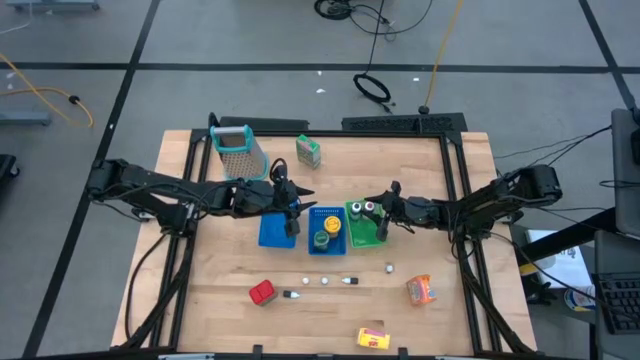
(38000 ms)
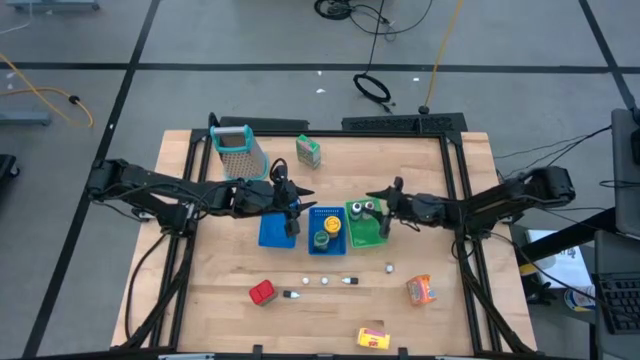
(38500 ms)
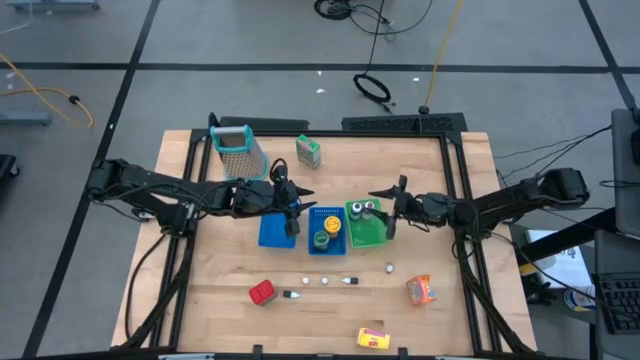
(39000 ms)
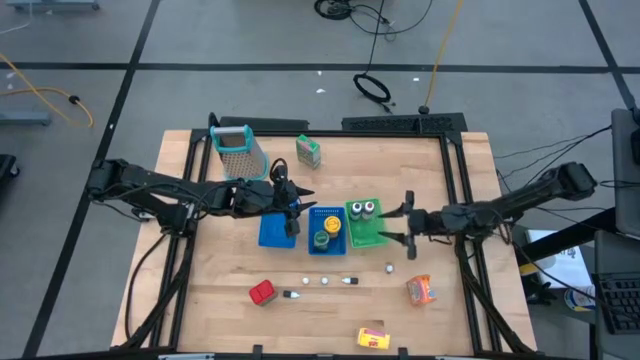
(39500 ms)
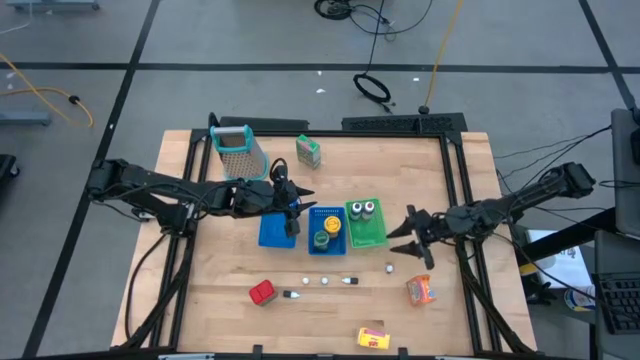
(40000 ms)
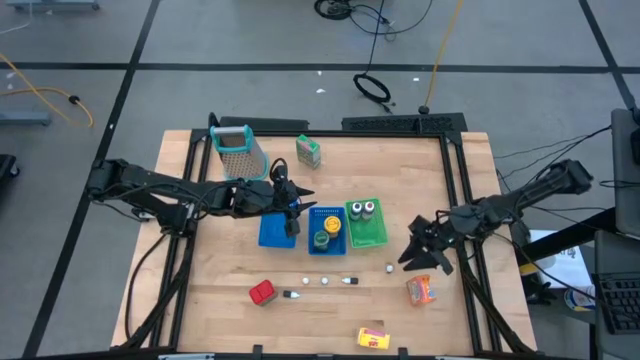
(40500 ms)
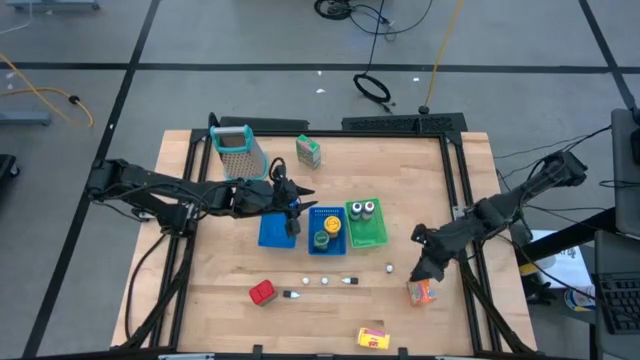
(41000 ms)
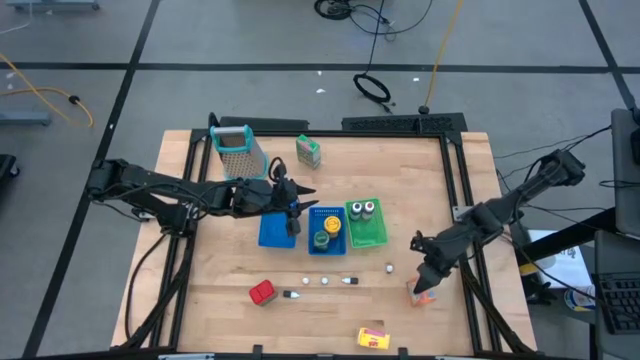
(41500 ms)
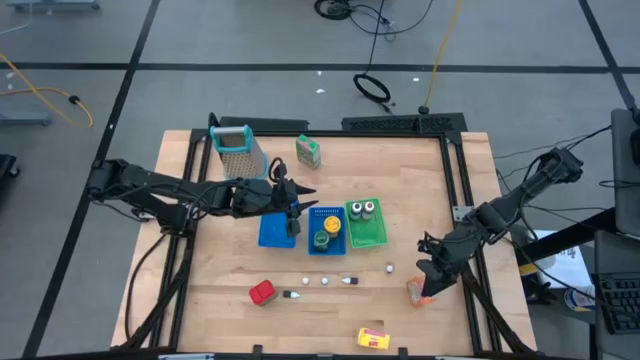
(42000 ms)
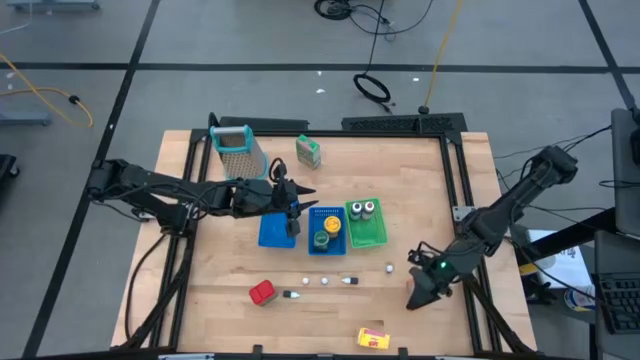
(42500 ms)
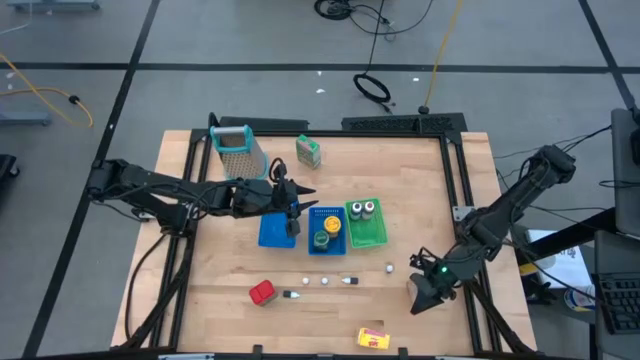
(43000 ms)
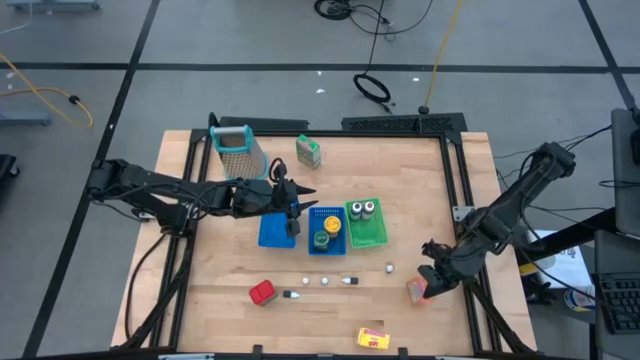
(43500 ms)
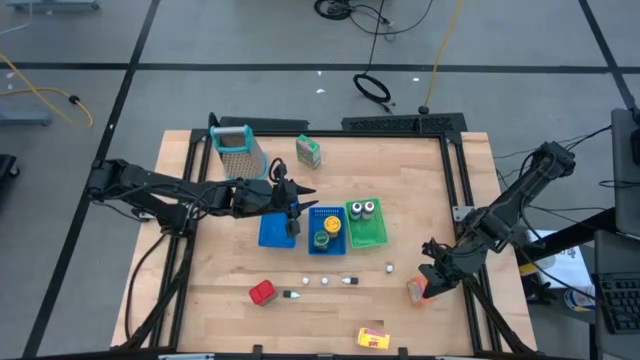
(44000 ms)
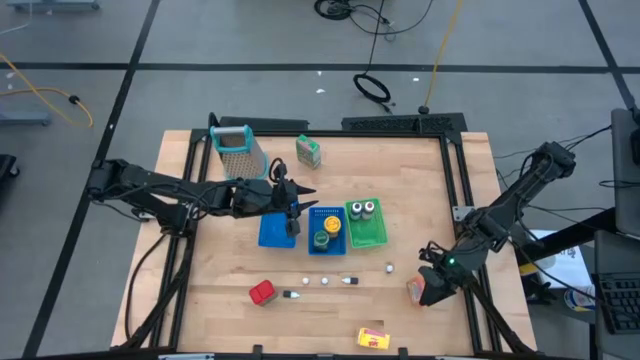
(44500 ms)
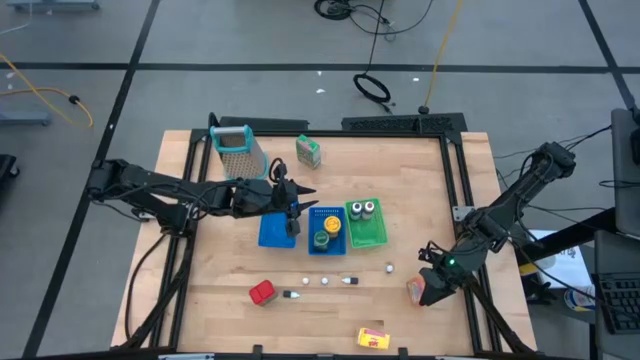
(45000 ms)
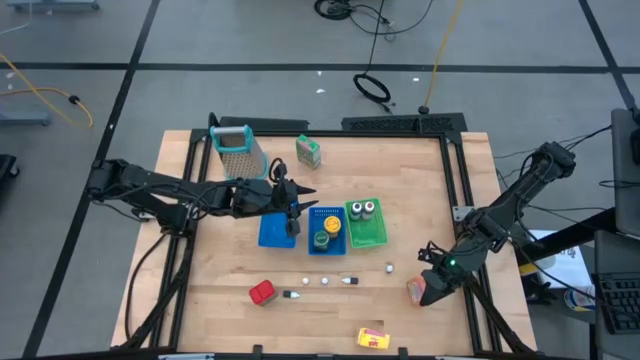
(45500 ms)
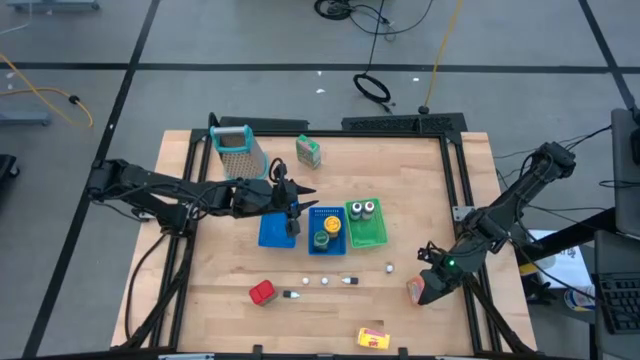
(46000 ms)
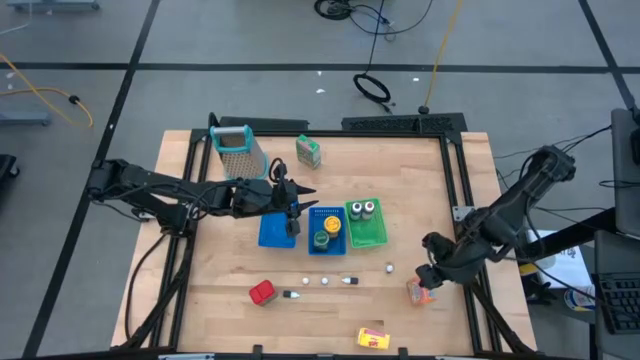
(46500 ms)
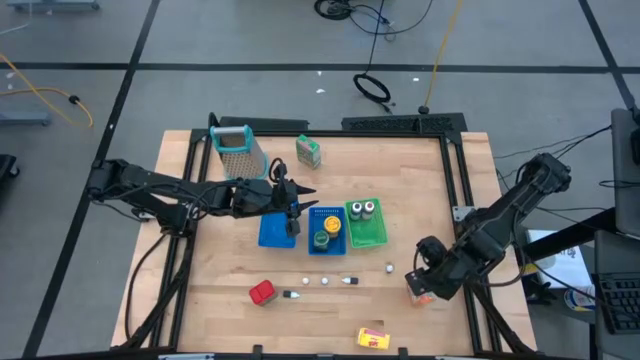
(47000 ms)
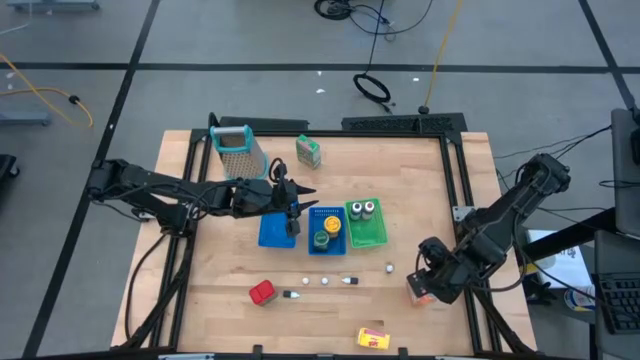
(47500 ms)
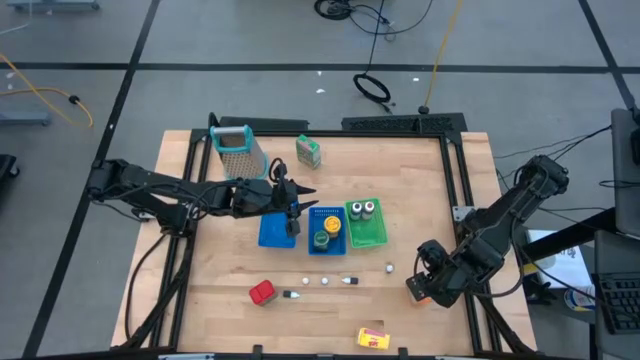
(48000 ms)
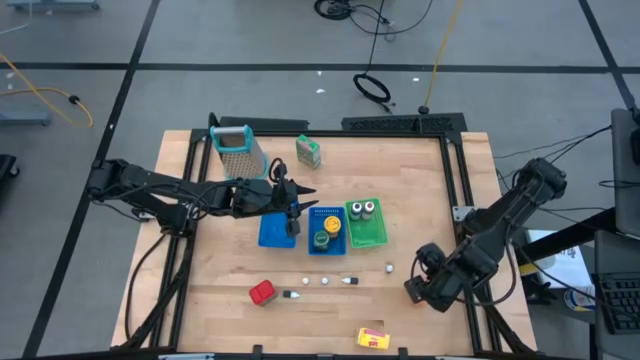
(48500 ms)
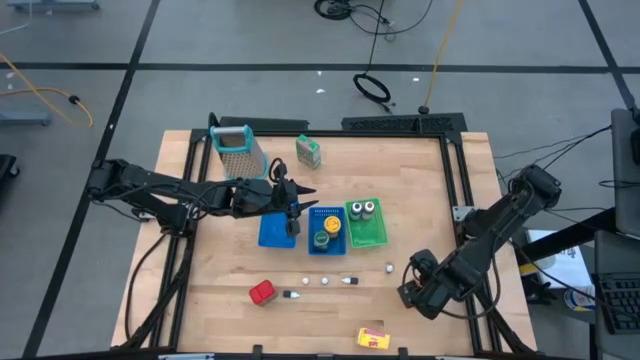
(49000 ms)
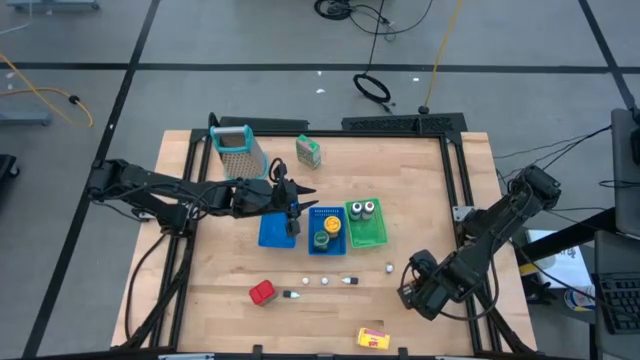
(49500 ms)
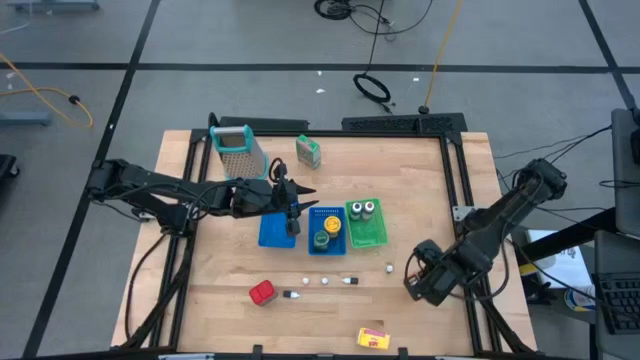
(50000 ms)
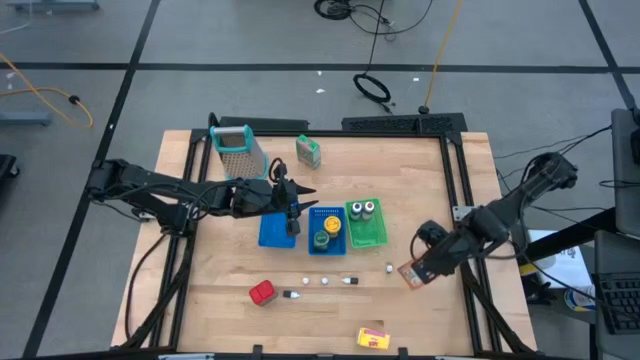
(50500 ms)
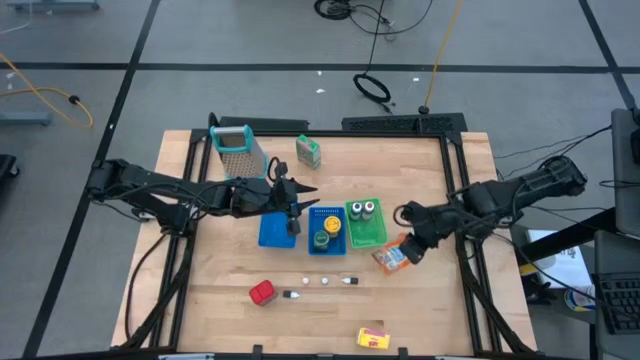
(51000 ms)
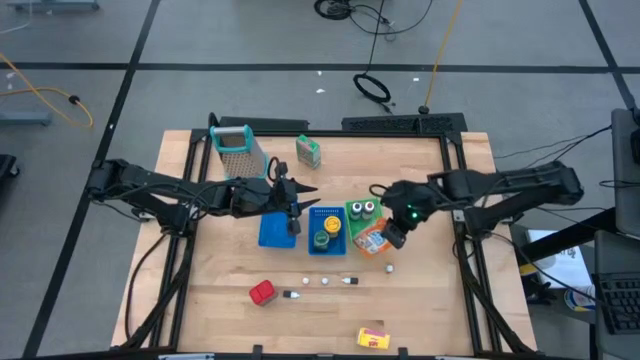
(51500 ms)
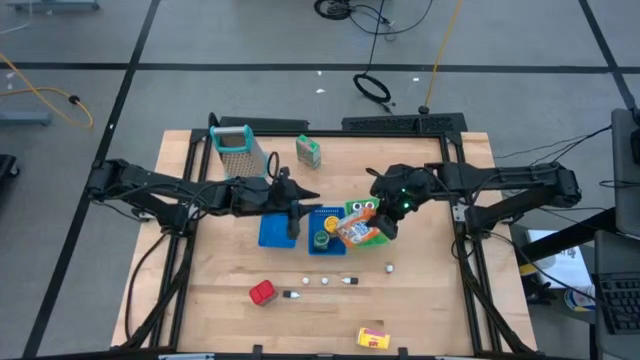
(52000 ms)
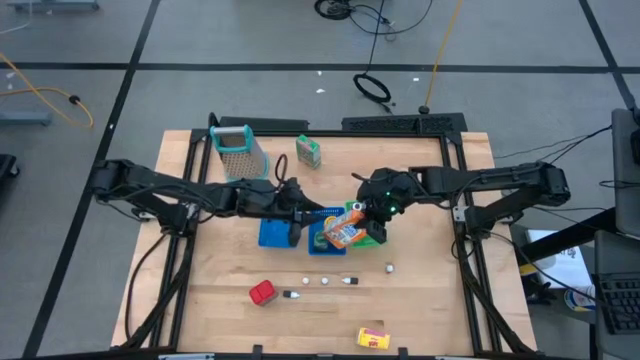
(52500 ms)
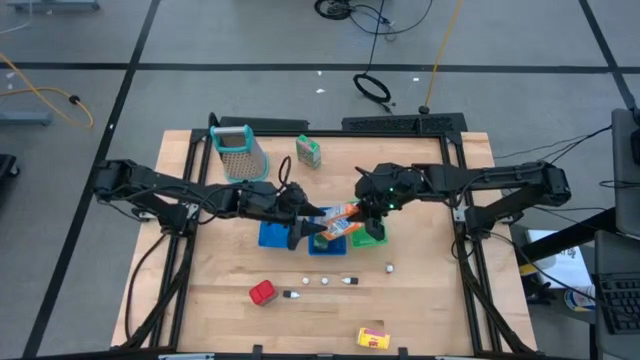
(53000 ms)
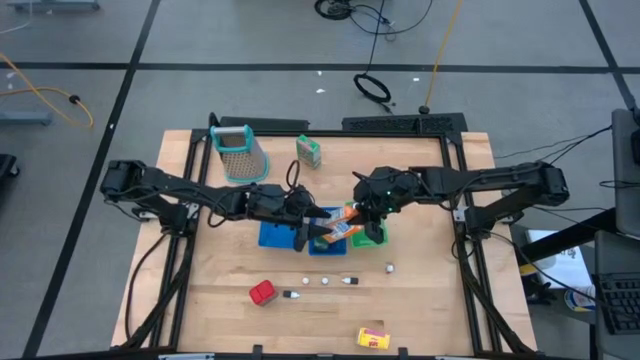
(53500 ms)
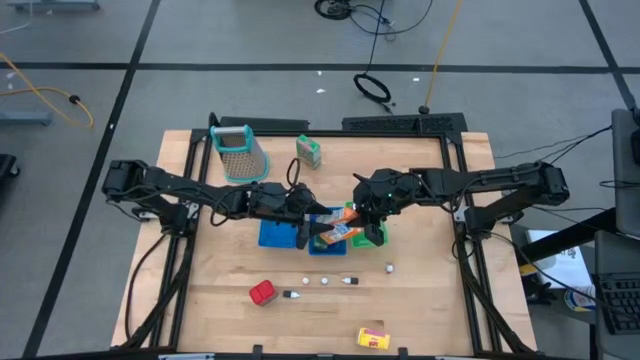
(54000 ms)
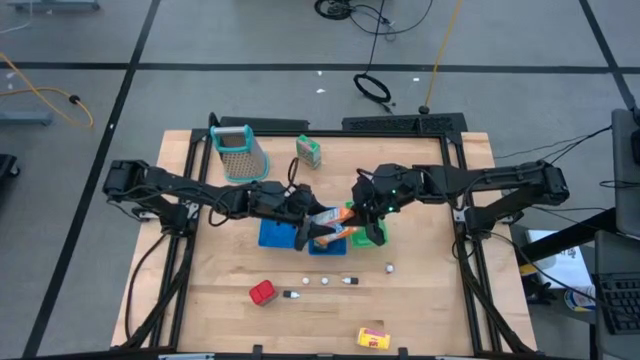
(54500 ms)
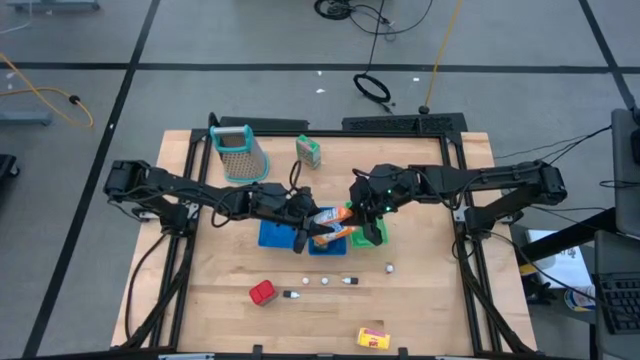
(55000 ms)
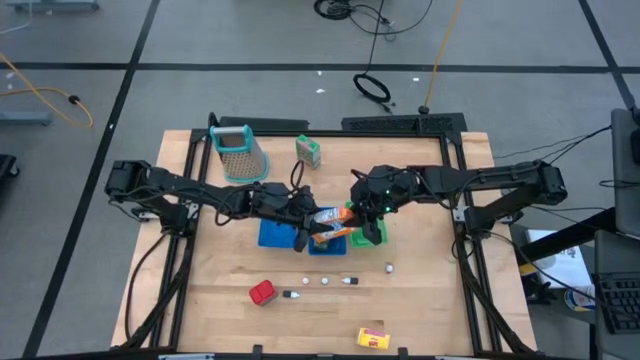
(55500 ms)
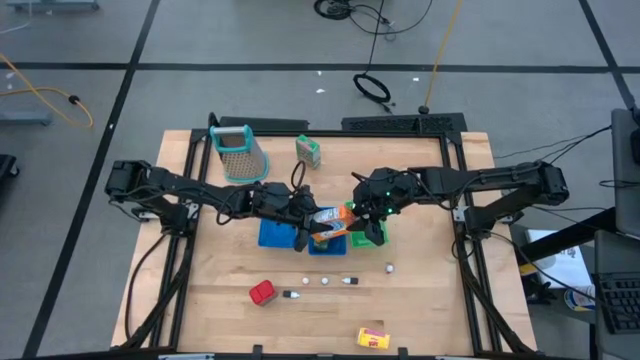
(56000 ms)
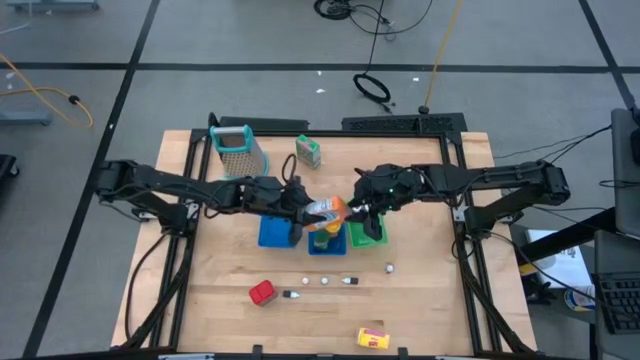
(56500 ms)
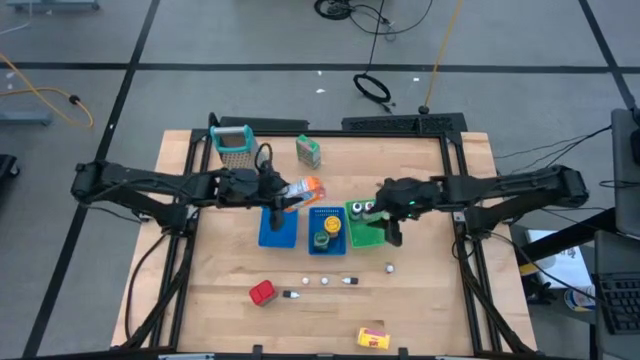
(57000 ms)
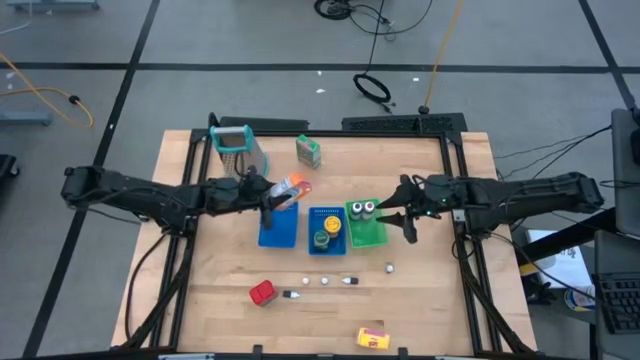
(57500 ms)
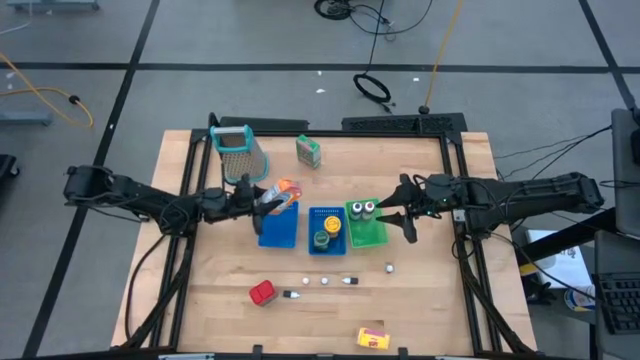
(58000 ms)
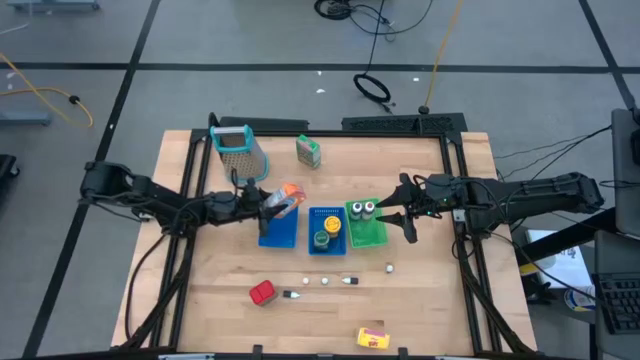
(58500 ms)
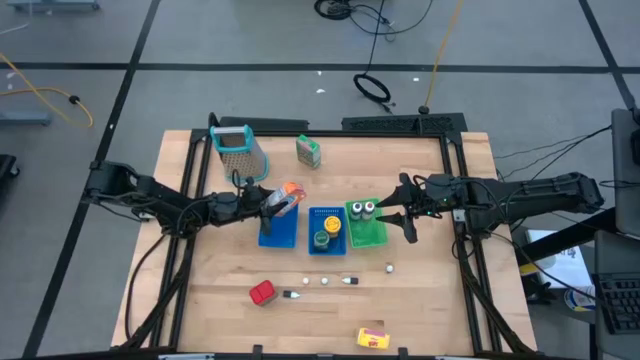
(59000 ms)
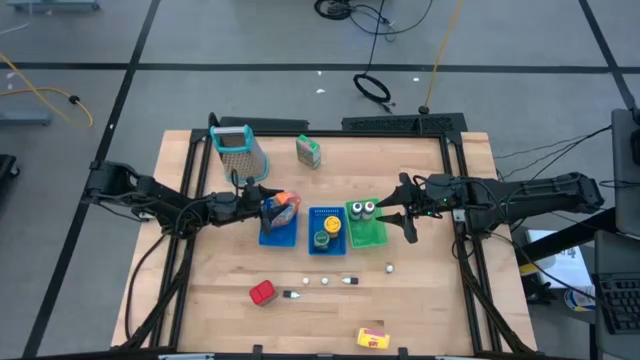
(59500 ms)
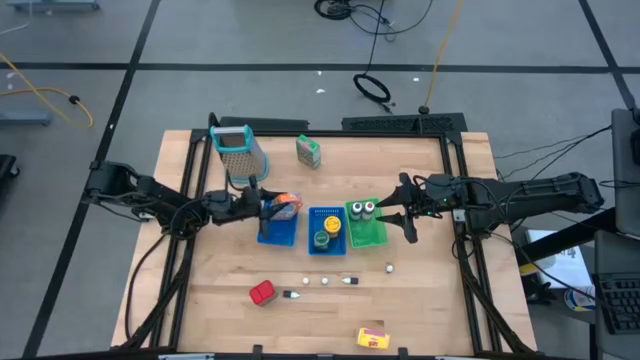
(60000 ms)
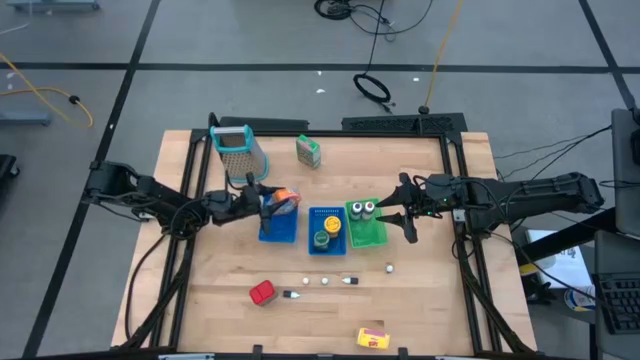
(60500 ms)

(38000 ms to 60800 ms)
Task: Pick & Place Kitchen Items
Put the orange cereal box into the left blue bin
